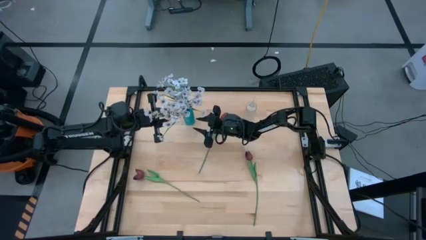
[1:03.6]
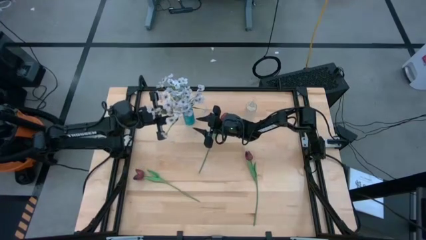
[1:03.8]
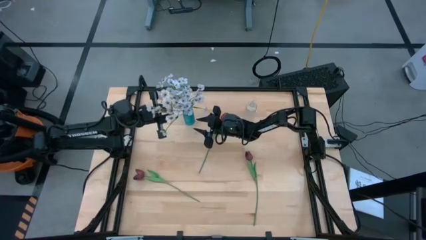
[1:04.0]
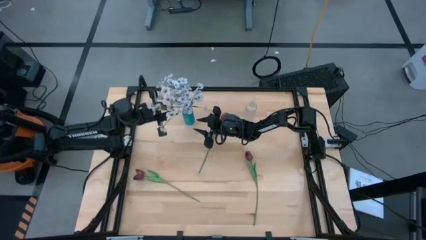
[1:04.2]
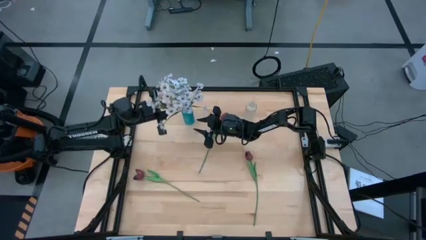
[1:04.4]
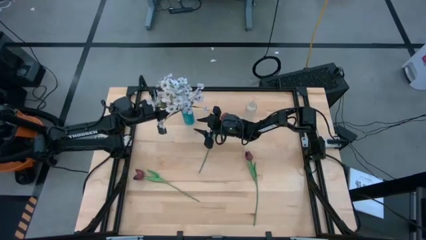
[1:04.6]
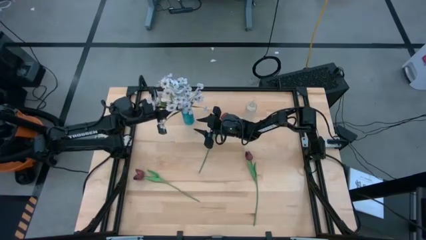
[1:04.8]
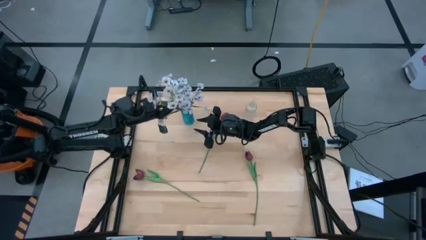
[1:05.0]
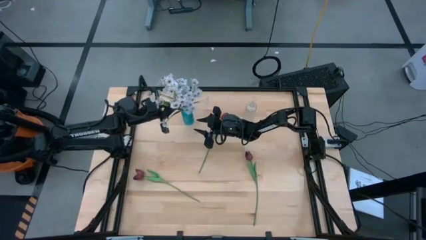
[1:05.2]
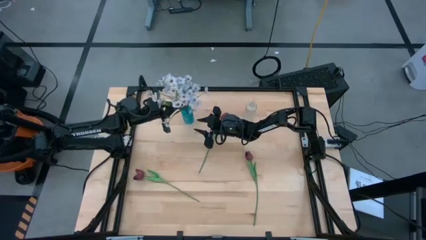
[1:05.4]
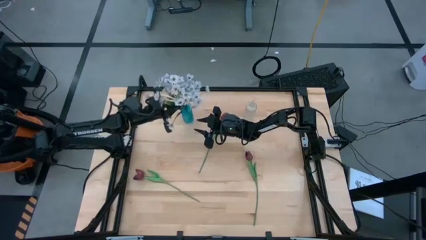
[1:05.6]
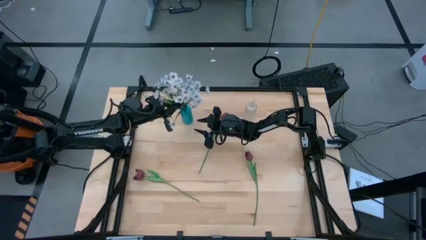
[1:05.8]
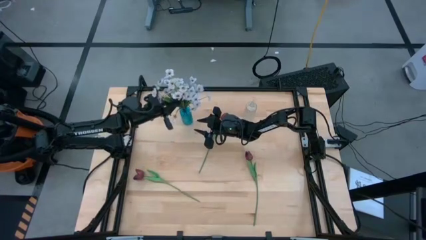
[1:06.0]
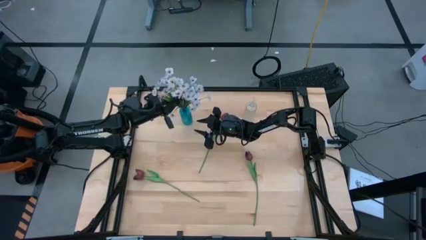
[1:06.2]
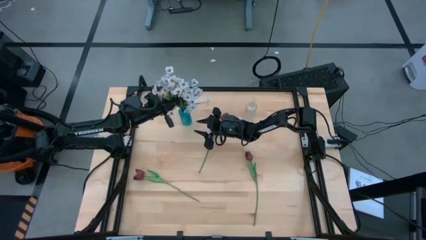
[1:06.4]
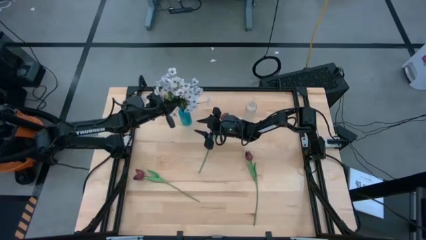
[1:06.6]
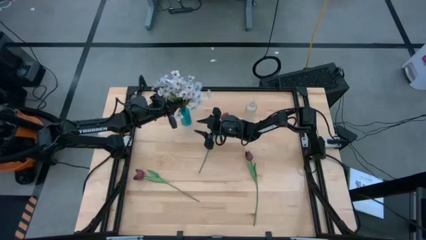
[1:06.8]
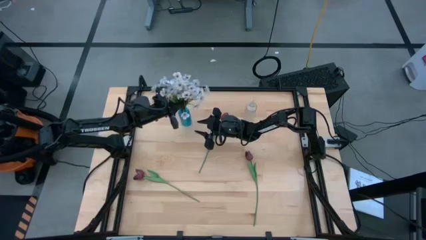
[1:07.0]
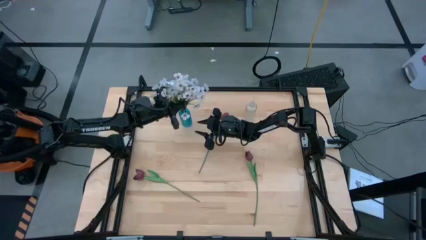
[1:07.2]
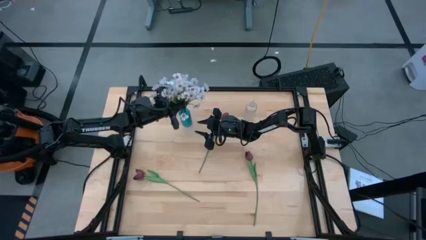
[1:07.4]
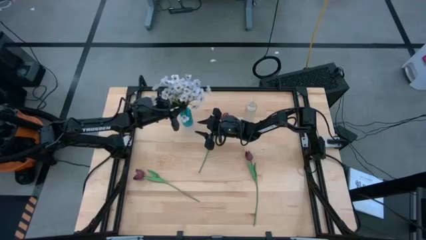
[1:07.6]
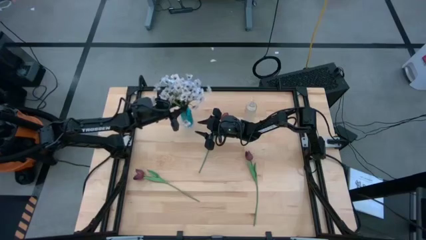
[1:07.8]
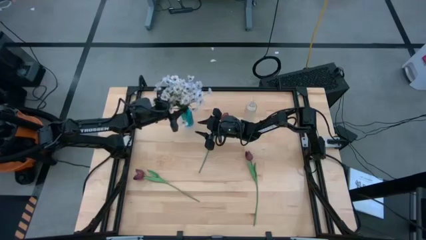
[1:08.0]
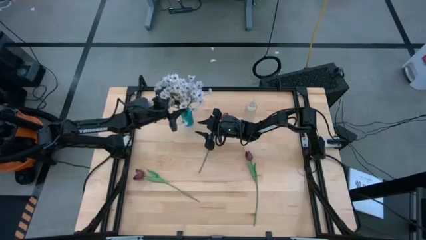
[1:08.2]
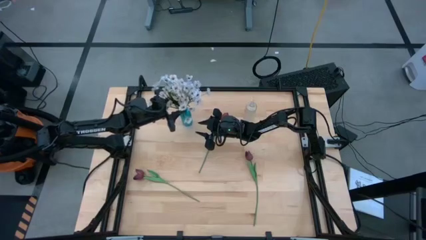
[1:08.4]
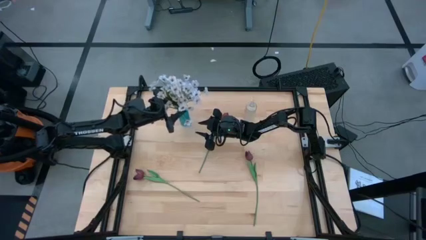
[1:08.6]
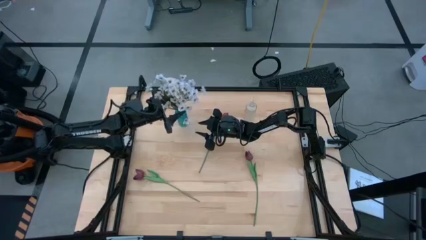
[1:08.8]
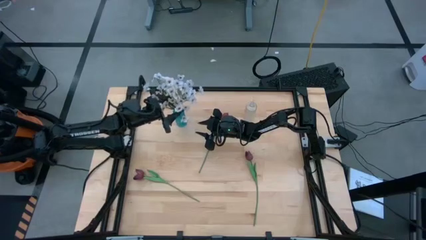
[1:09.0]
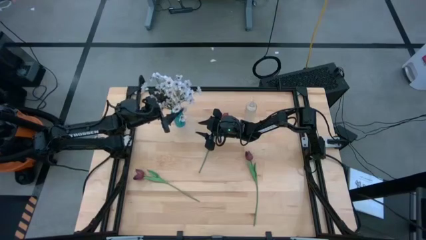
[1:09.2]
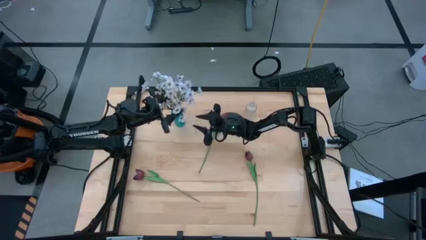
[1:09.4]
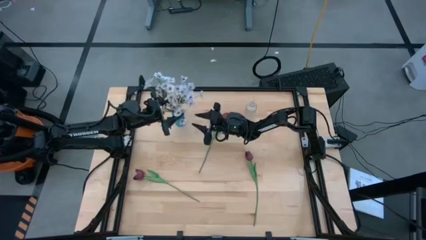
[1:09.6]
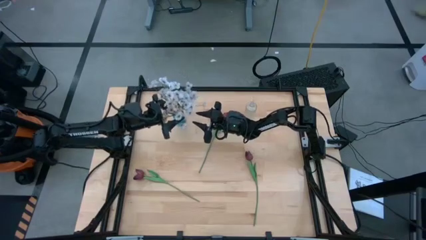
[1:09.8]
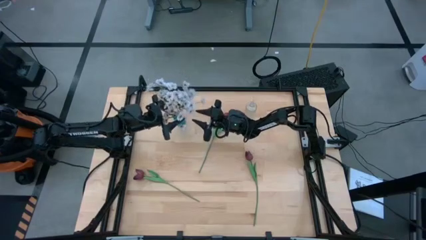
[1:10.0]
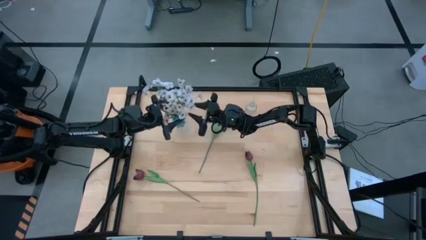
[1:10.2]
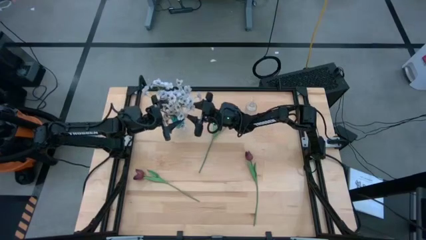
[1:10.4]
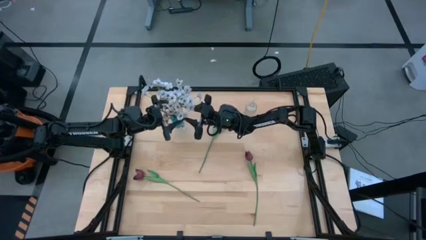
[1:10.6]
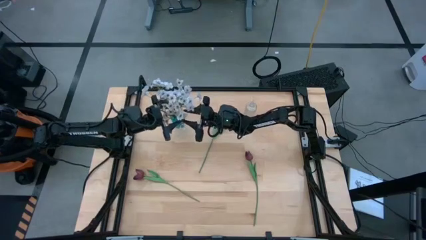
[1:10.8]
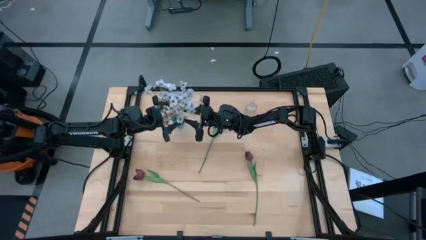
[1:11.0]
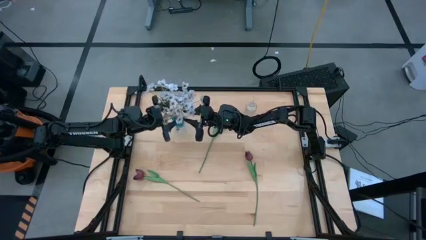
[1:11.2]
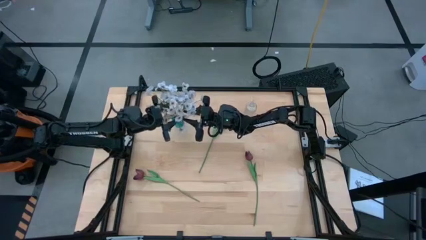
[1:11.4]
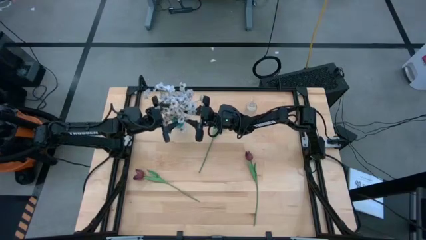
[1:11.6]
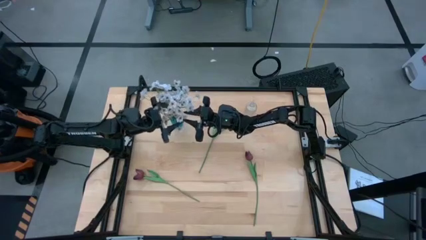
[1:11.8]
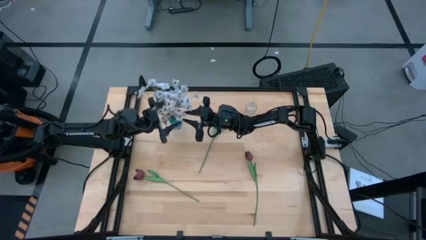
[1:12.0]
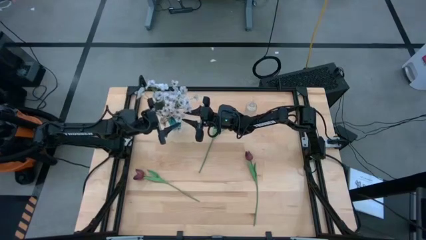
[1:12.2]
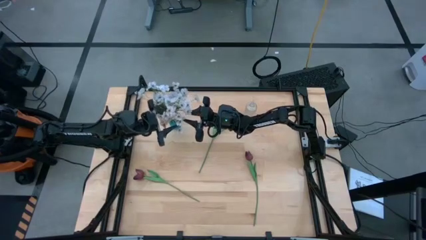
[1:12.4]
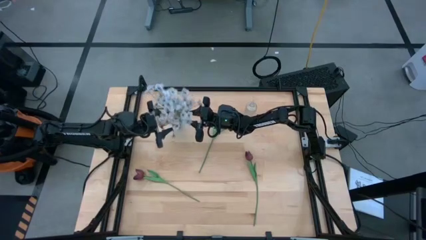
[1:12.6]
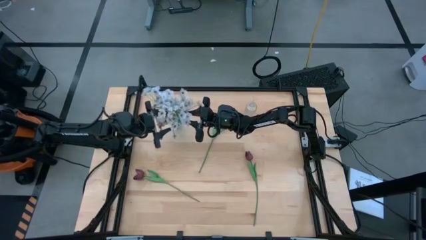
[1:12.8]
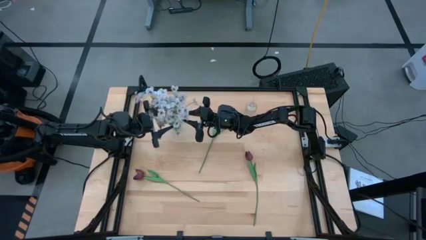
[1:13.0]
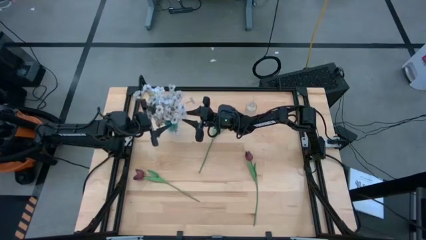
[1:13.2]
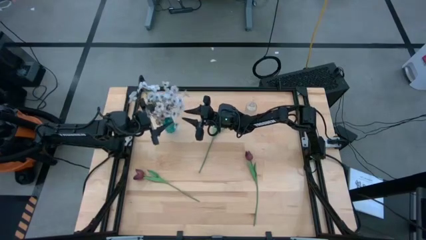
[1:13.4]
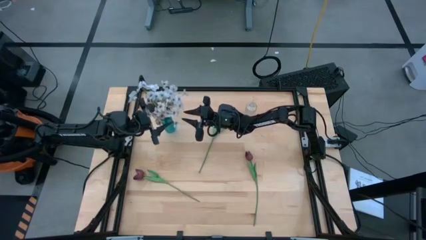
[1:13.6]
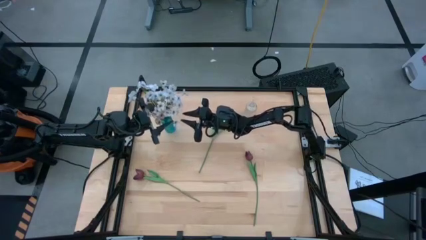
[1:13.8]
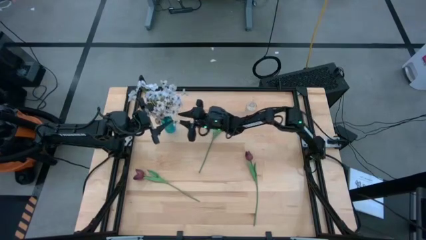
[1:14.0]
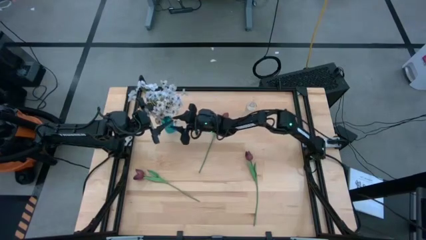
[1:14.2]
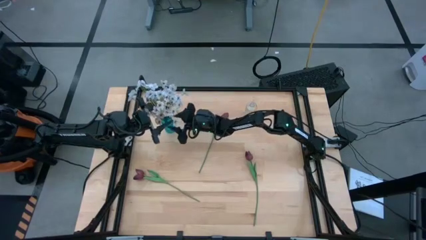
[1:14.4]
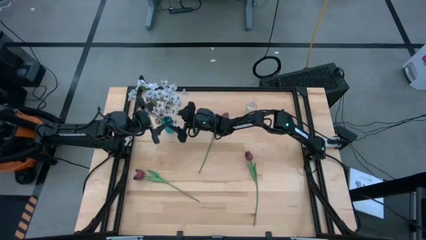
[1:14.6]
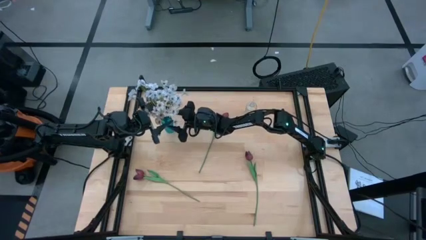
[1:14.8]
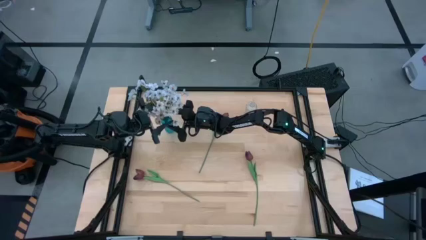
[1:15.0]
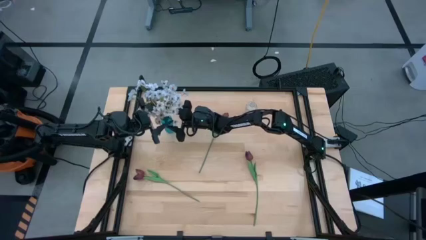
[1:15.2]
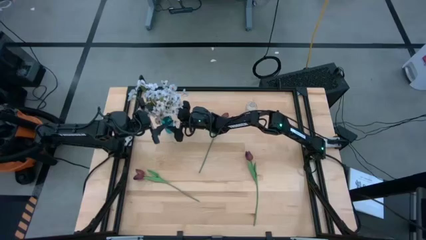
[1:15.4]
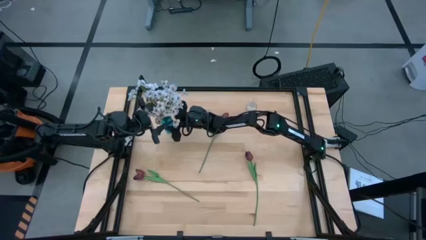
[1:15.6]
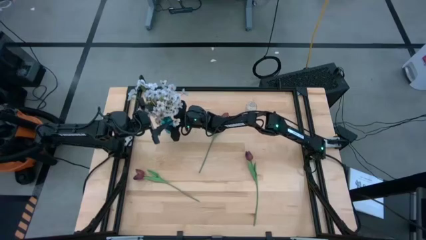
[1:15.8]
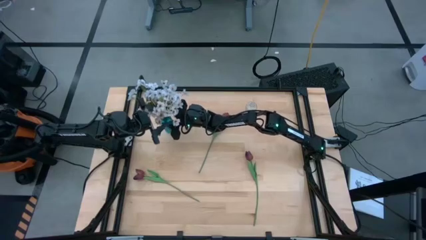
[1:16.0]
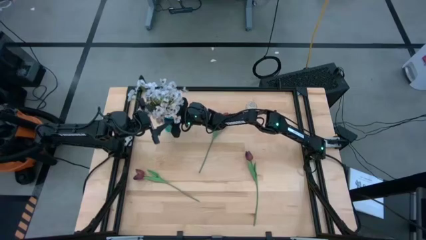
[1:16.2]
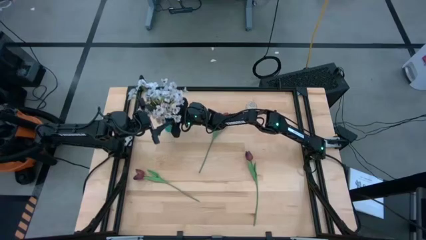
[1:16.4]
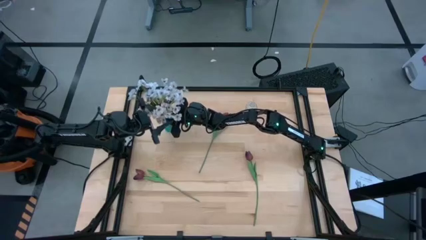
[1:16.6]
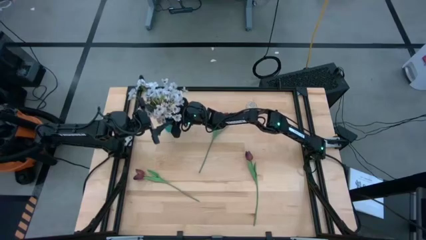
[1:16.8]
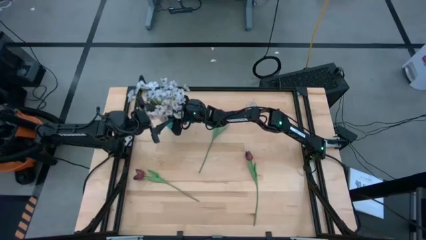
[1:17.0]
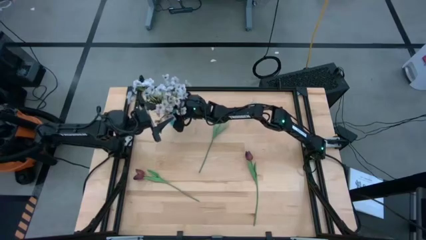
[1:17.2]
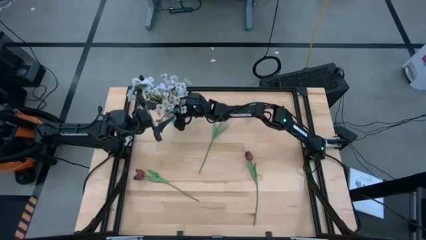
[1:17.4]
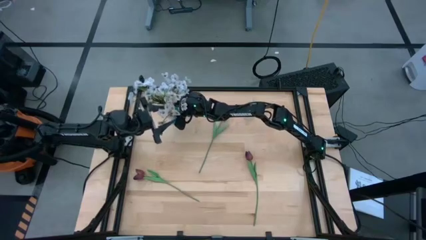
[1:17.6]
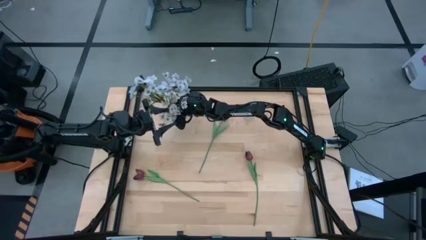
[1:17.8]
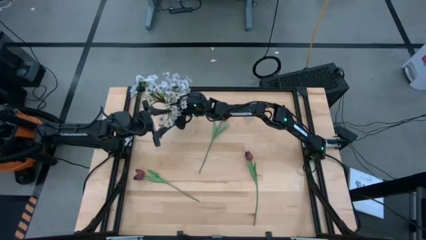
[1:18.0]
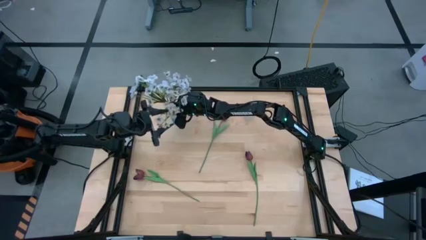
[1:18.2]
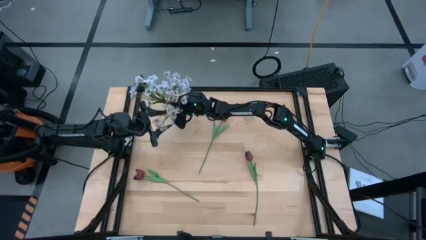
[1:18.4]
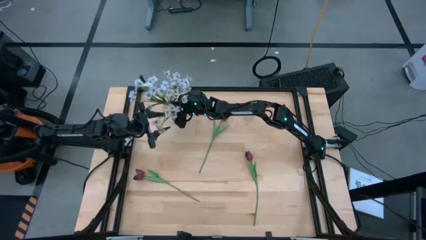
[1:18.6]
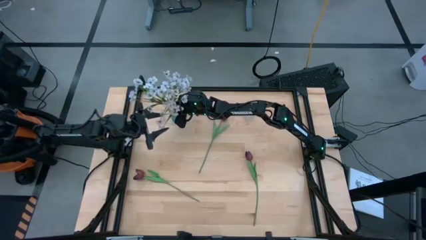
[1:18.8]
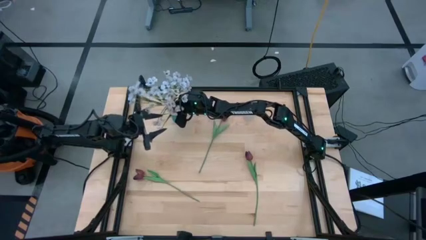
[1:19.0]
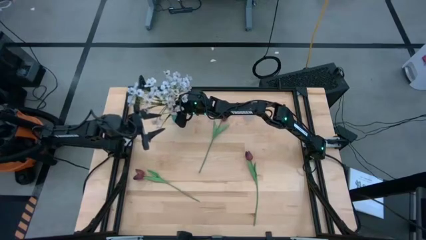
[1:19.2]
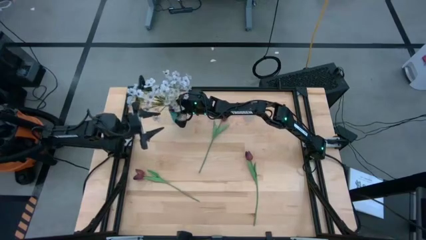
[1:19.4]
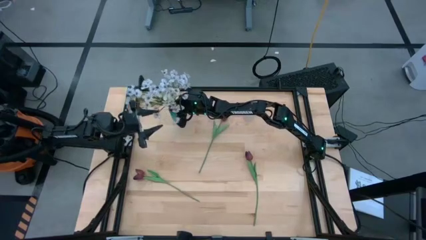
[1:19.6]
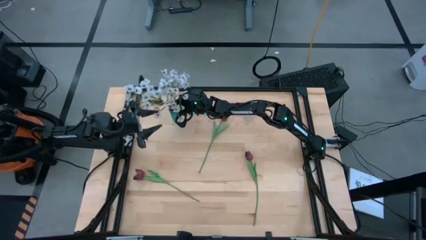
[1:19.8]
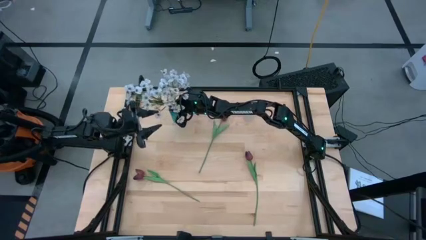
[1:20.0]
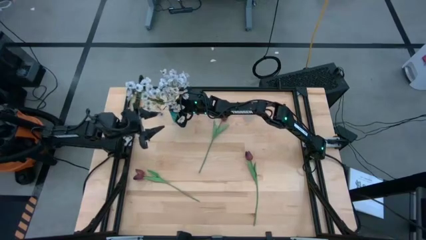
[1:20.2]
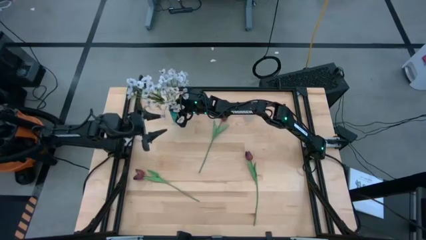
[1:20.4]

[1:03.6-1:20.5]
Task: Sort flowers into vase by color
Put the white flowers into the blue vase
